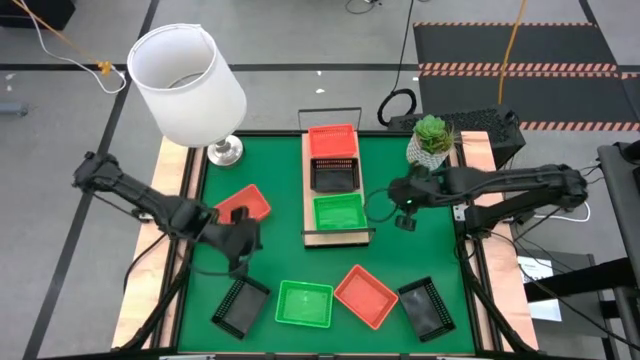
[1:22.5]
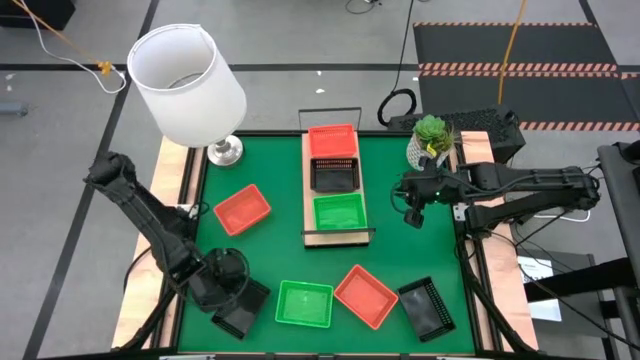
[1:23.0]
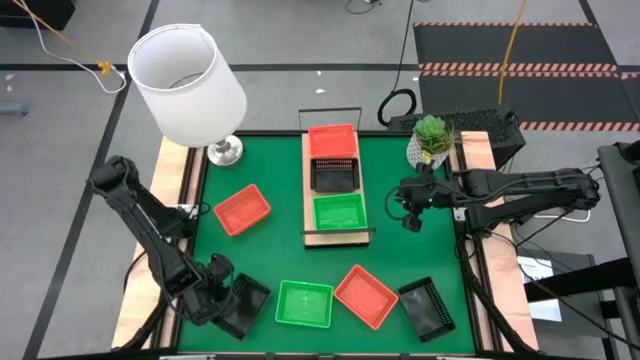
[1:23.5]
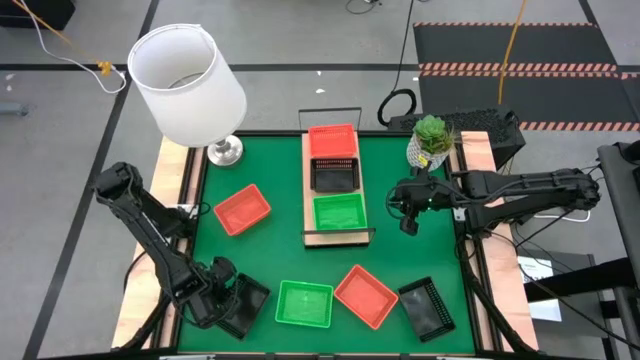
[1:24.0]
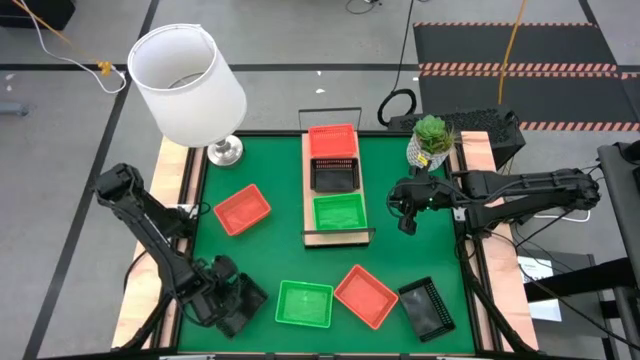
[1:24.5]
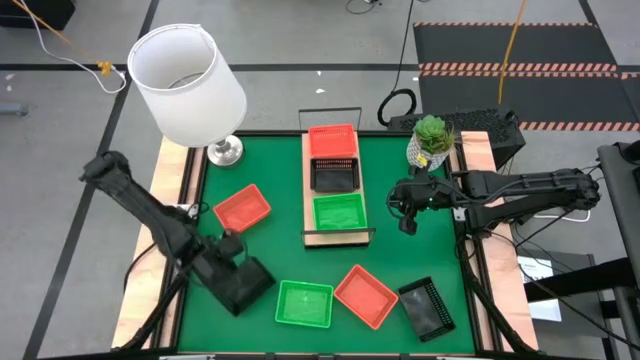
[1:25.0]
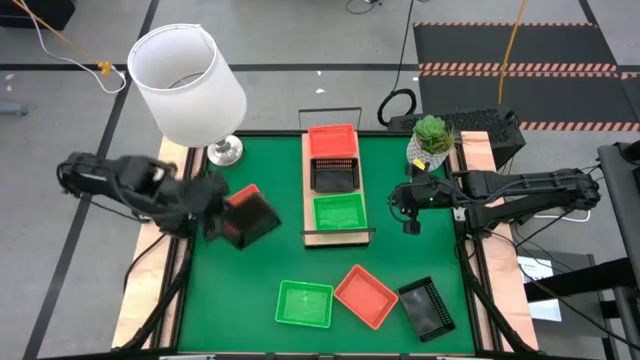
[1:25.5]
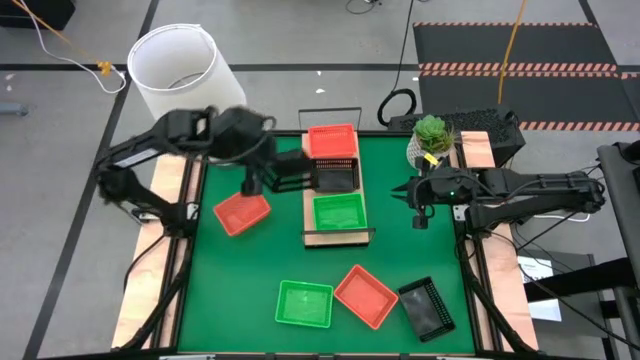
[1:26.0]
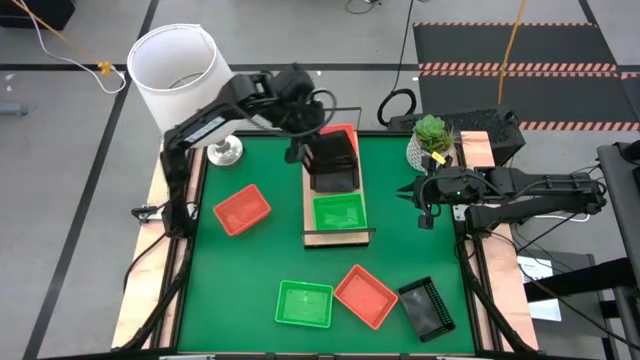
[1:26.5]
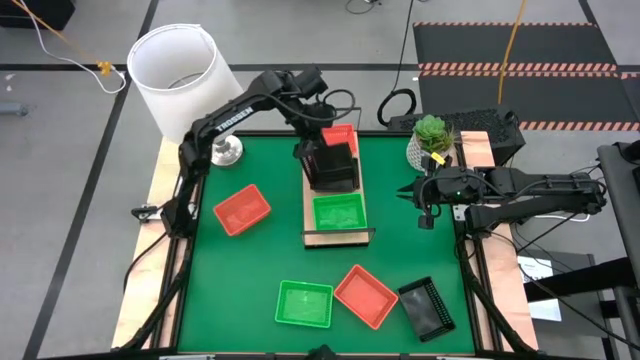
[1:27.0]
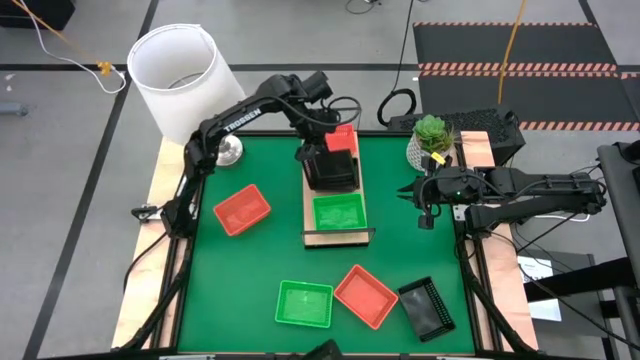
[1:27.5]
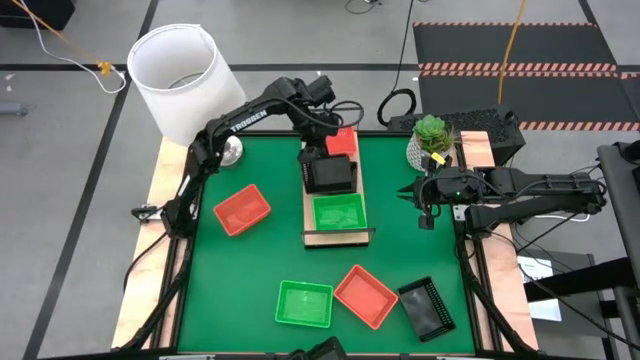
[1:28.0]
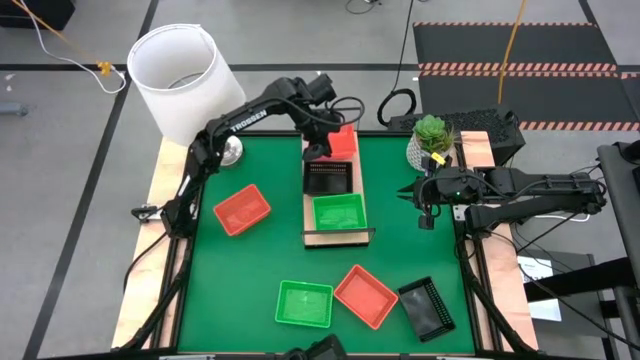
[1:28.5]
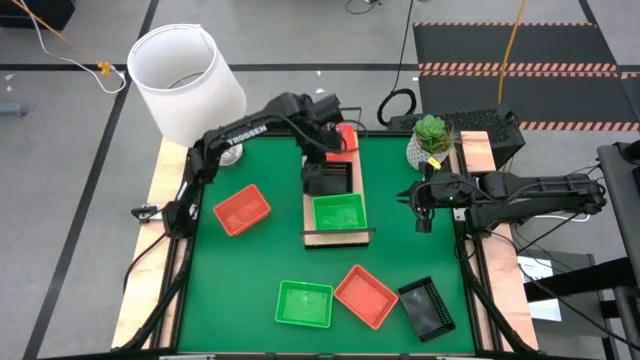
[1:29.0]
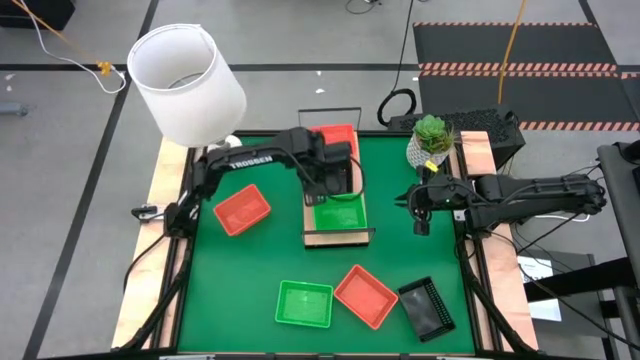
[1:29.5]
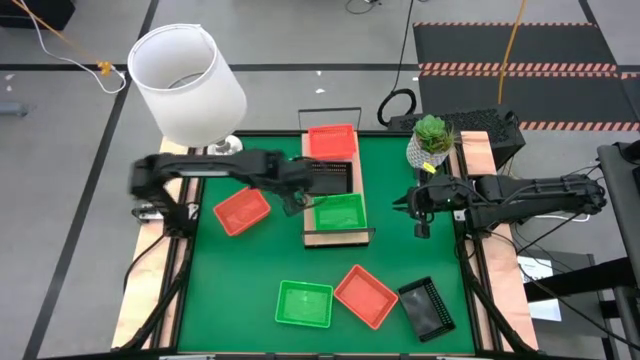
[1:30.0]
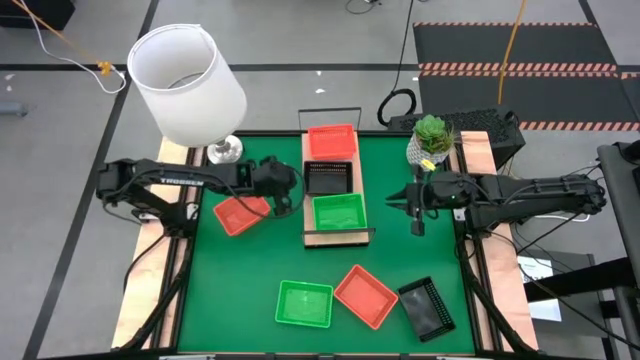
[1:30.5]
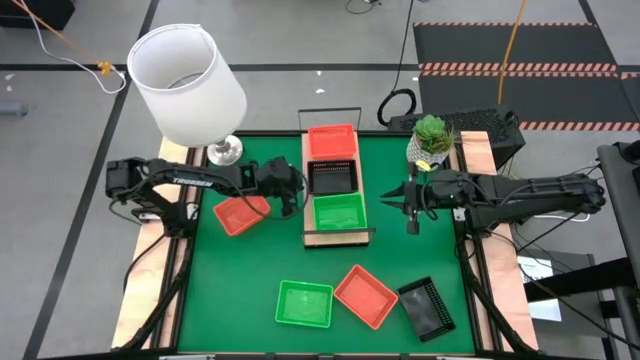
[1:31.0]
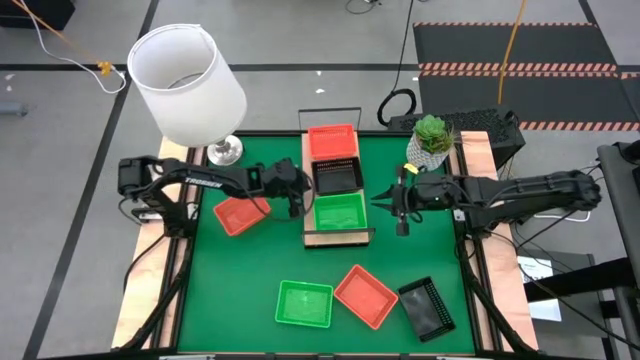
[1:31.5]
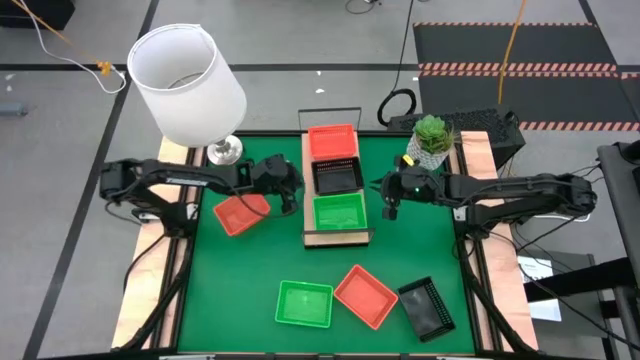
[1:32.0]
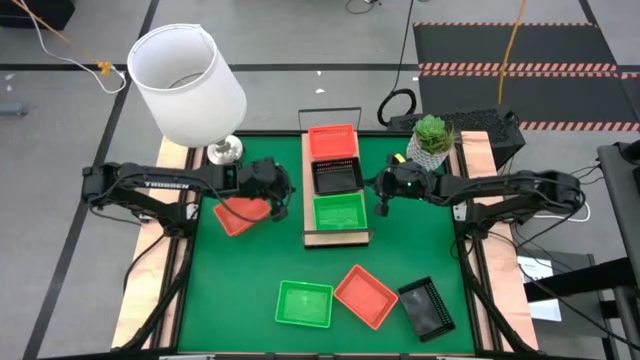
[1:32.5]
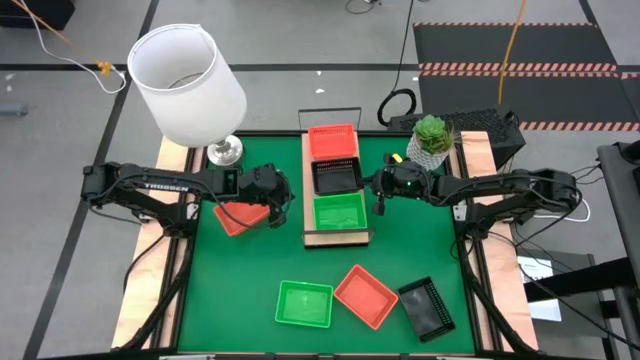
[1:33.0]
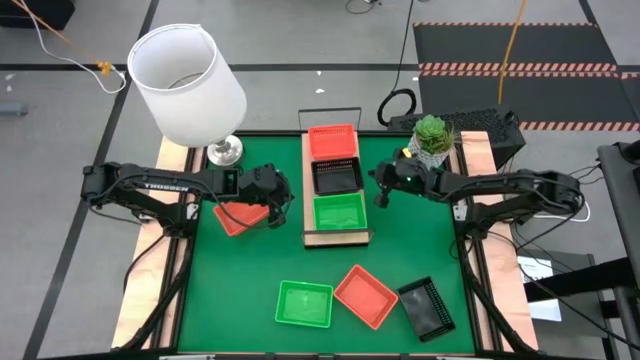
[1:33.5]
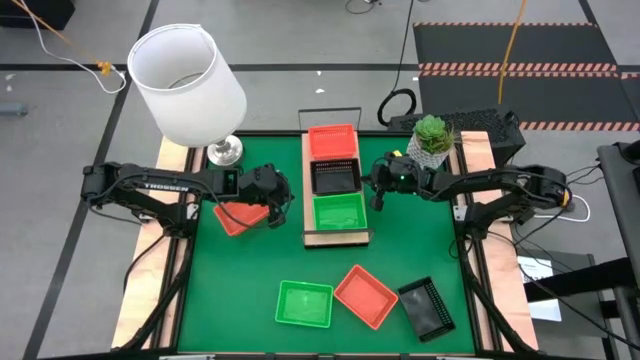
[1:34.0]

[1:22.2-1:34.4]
Task: Stack baskets on shelf by color
Stack the left black bin on the black bin on the shelf

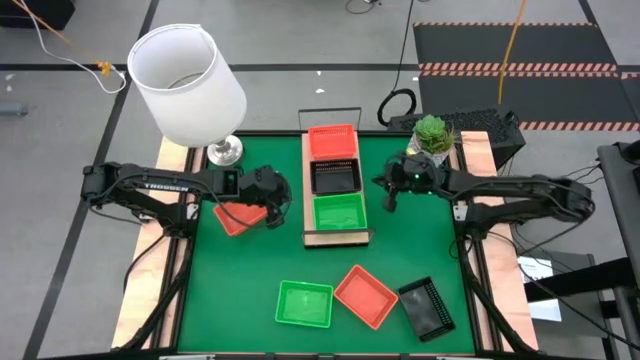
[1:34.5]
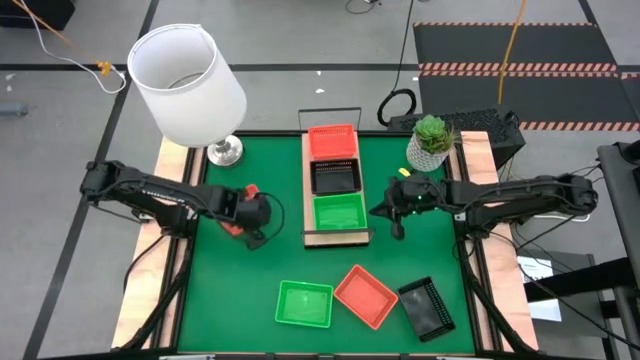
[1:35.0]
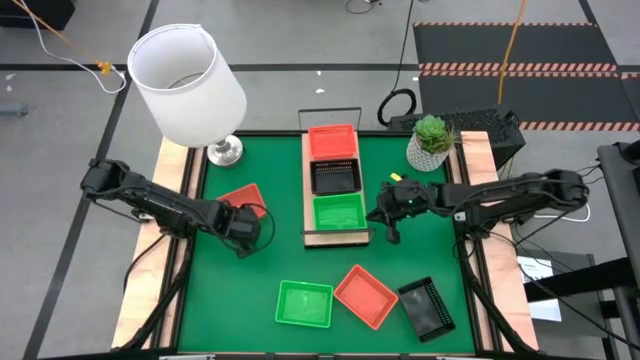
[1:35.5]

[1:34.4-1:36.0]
Adjust the green bins on the shelf

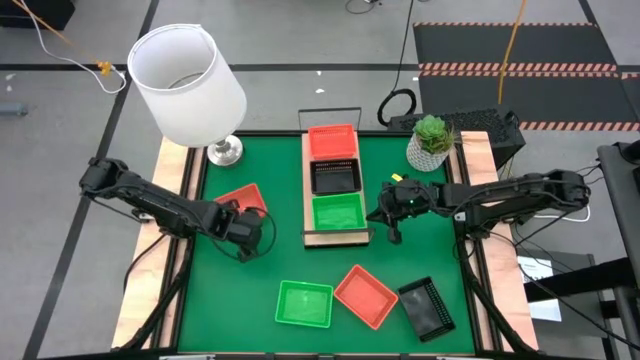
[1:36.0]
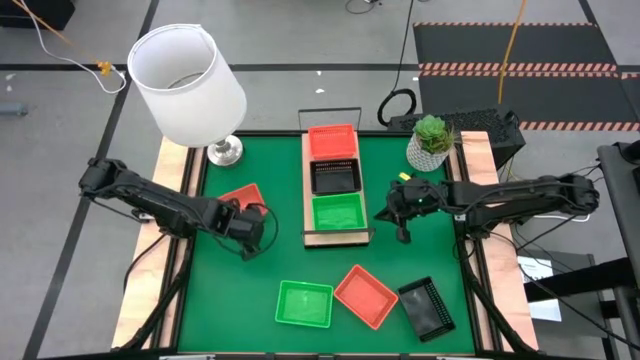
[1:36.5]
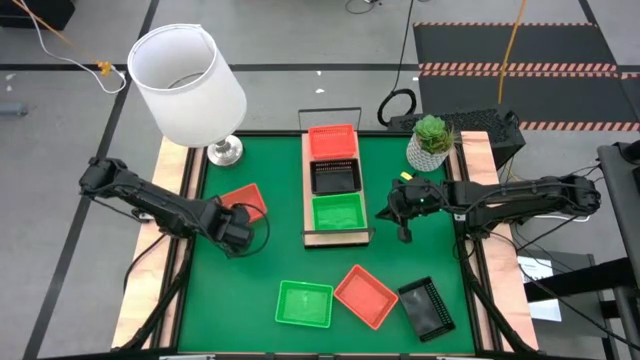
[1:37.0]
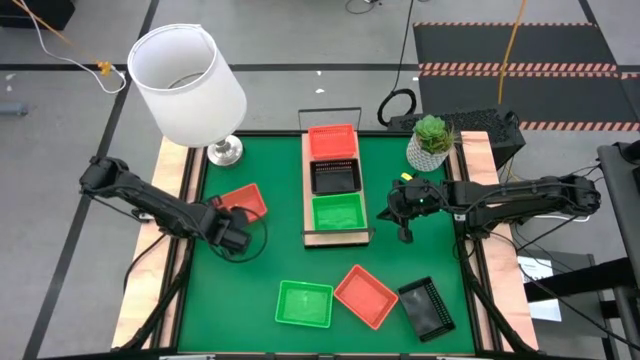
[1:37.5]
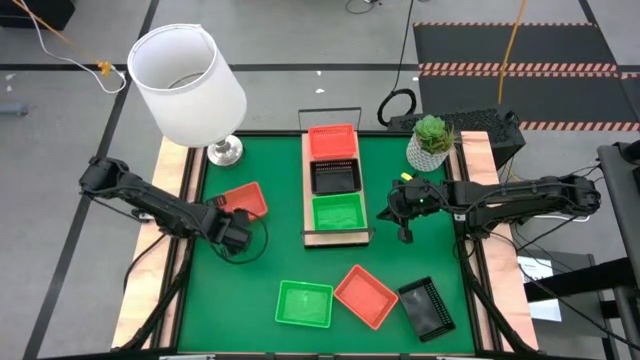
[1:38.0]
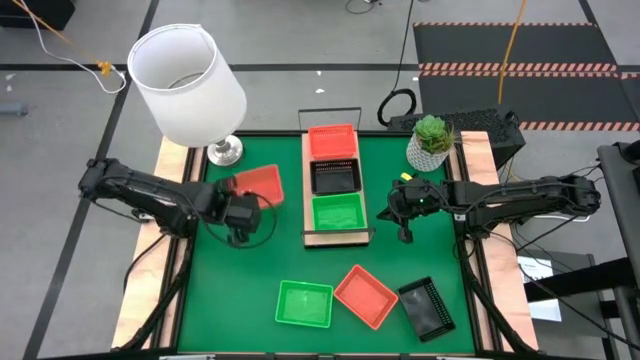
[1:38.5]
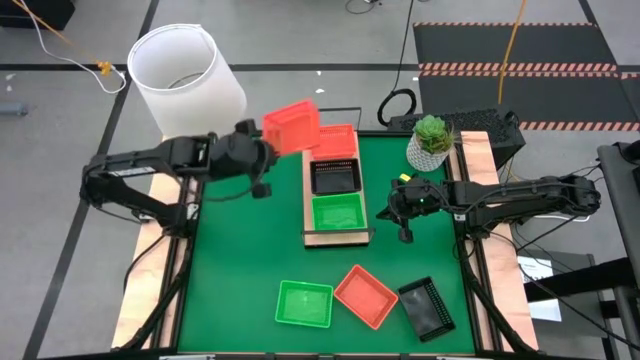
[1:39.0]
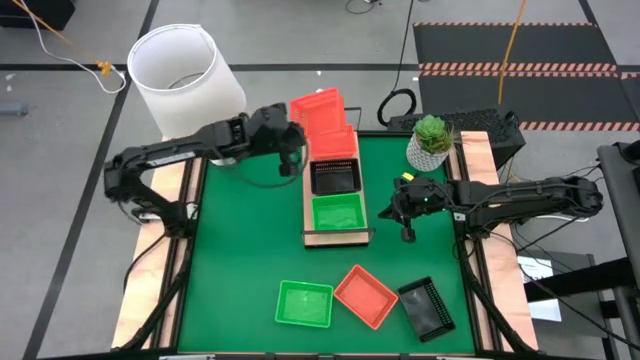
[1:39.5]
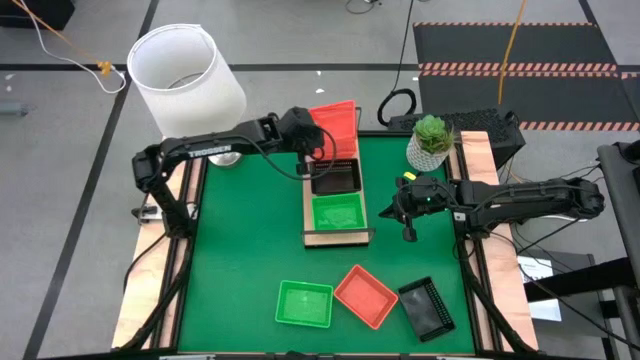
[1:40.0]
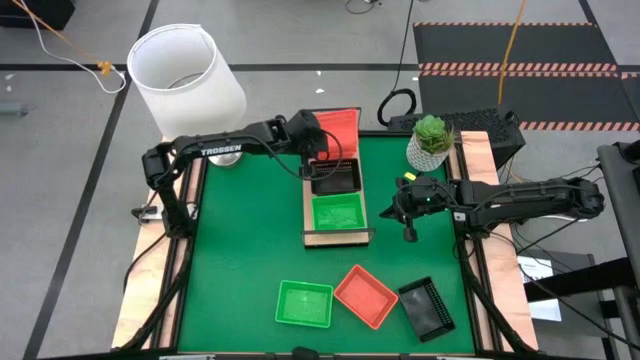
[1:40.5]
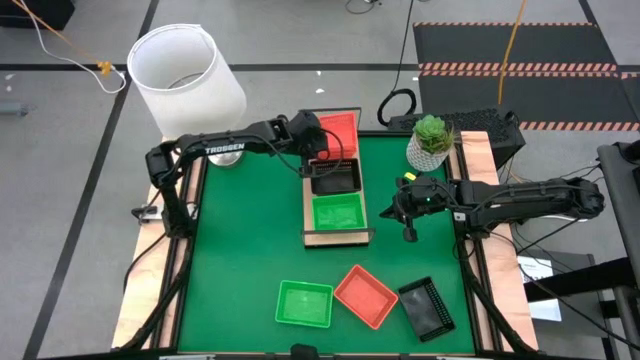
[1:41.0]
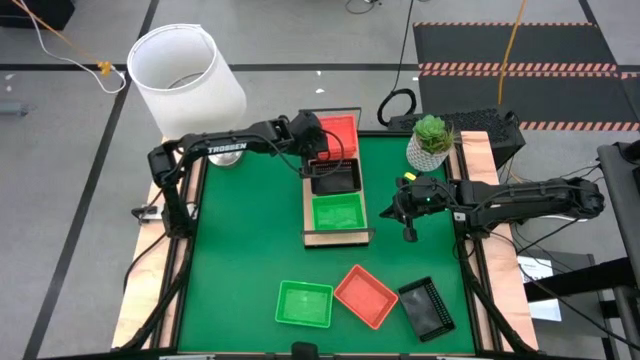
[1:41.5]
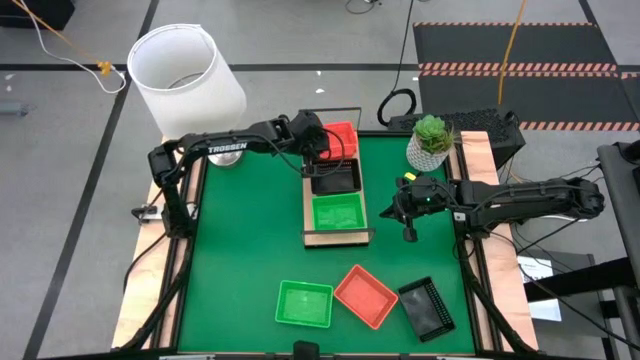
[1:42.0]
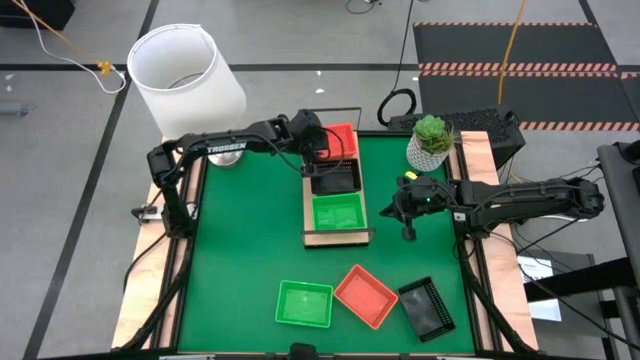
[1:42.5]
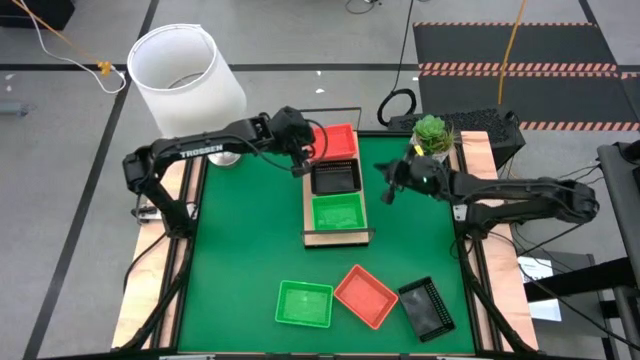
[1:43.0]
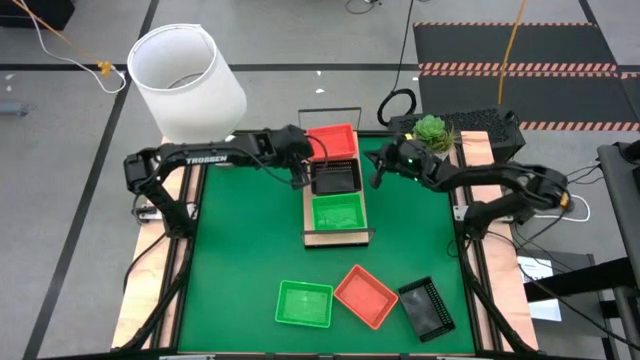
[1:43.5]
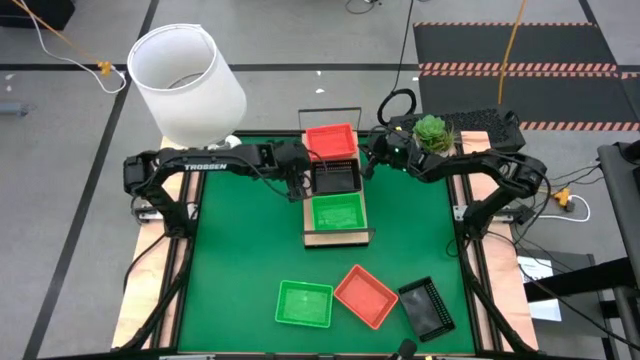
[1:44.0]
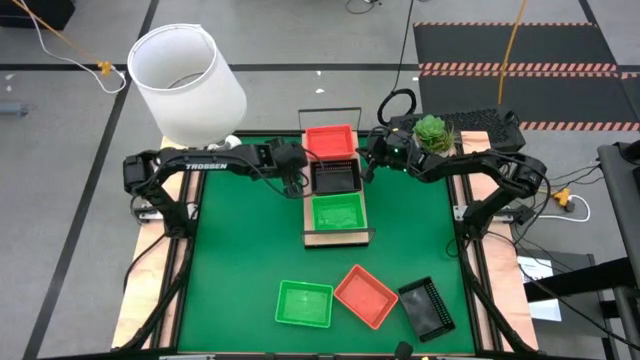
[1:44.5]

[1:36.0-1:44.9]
Stack the top orange bin on the orange bin on the shelf
